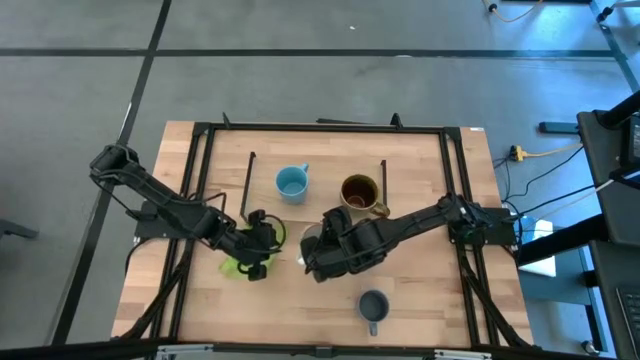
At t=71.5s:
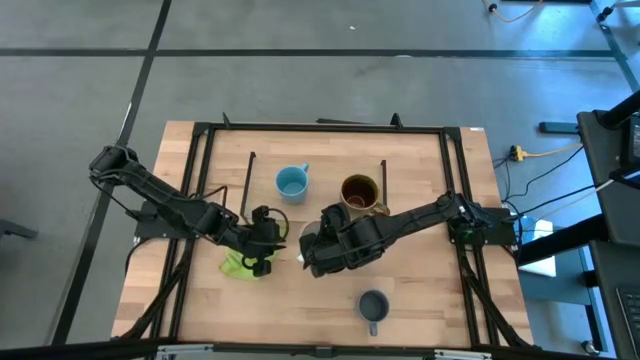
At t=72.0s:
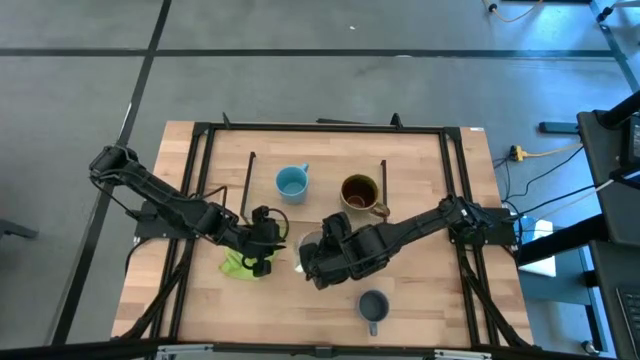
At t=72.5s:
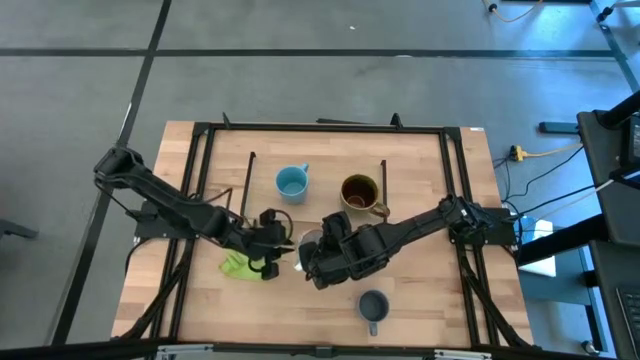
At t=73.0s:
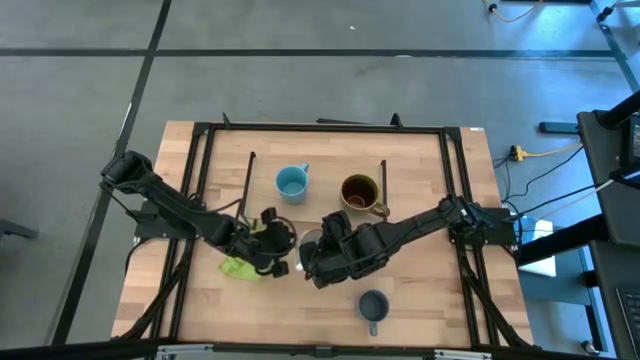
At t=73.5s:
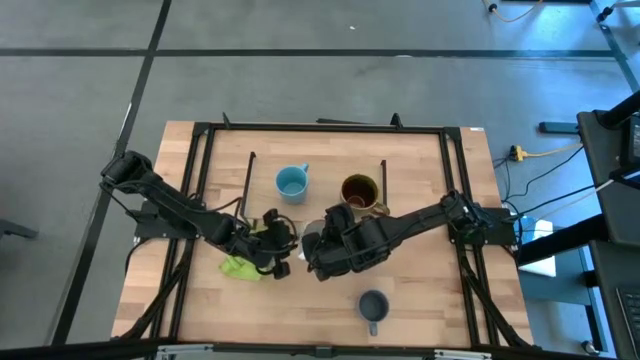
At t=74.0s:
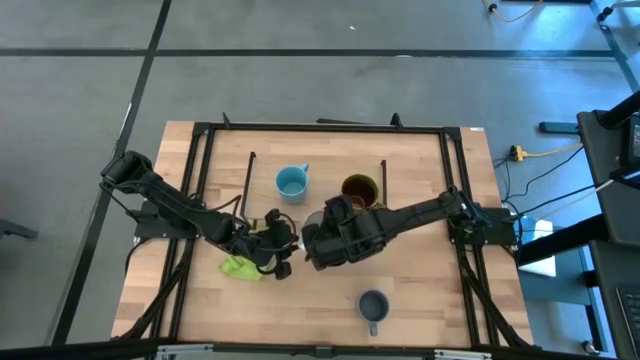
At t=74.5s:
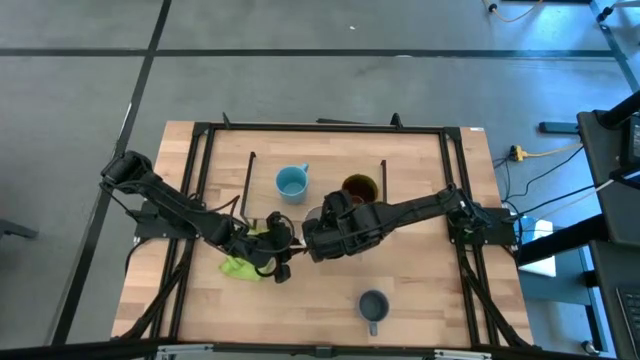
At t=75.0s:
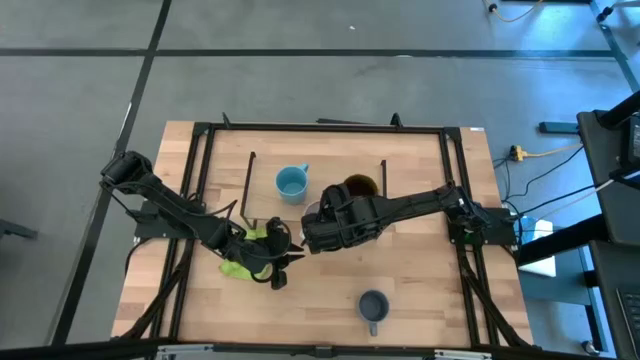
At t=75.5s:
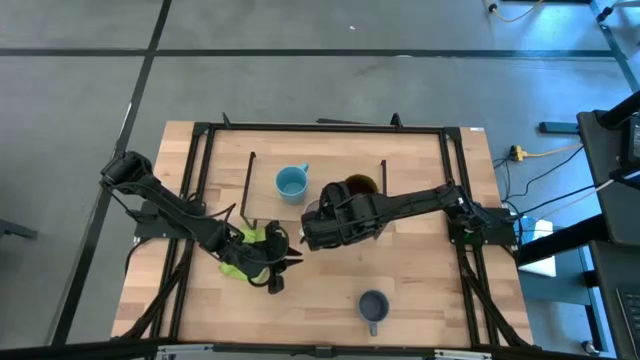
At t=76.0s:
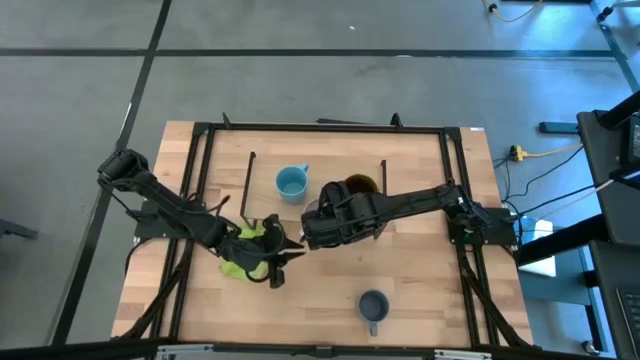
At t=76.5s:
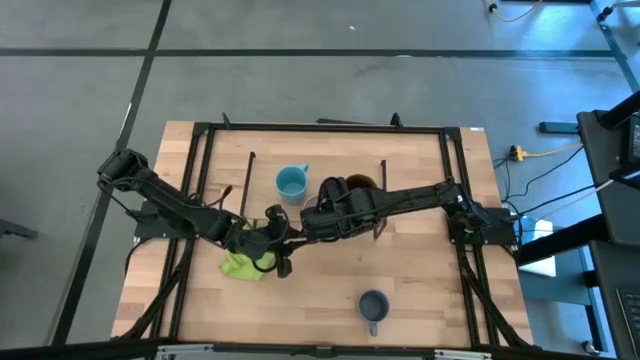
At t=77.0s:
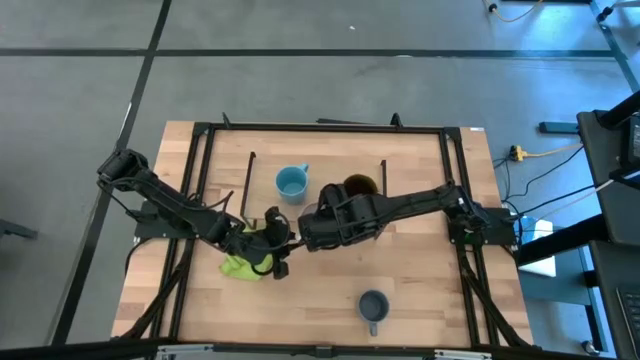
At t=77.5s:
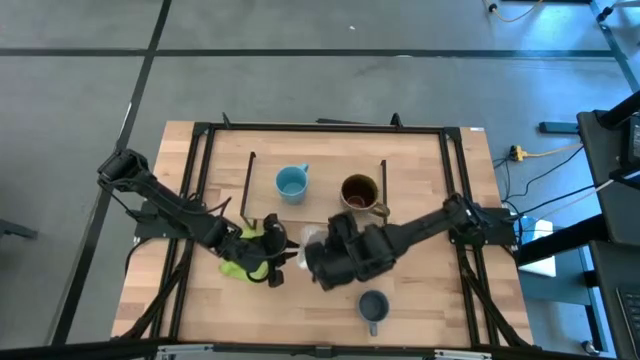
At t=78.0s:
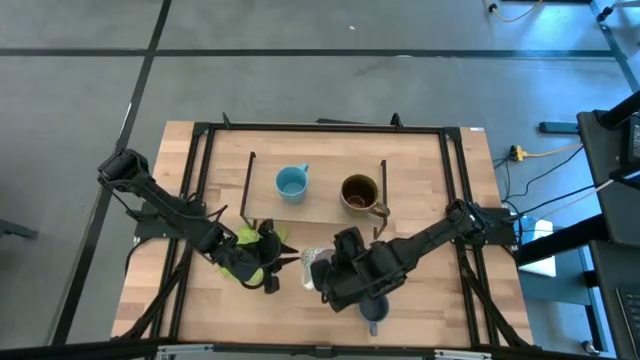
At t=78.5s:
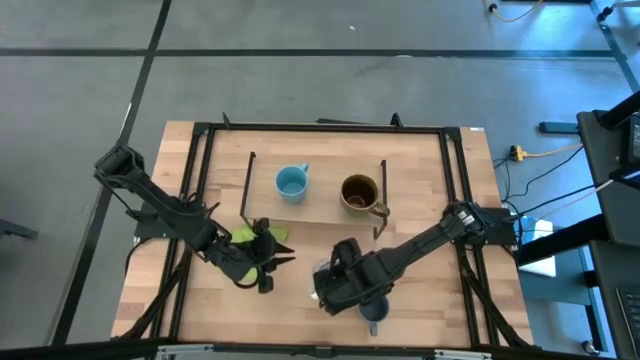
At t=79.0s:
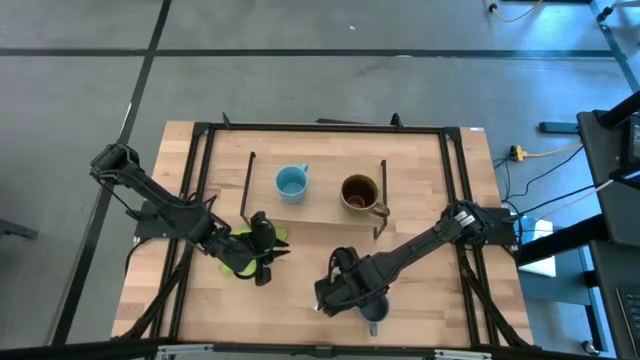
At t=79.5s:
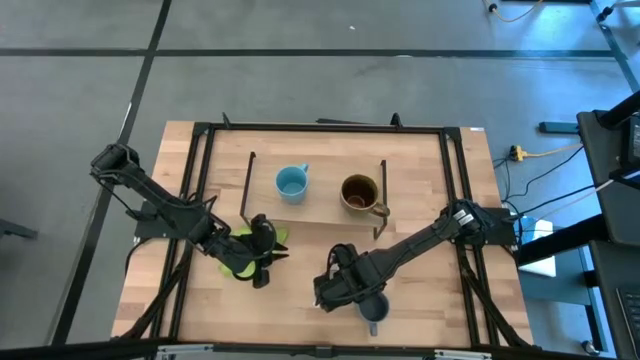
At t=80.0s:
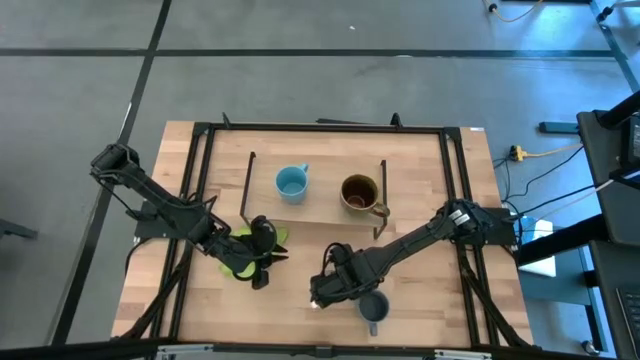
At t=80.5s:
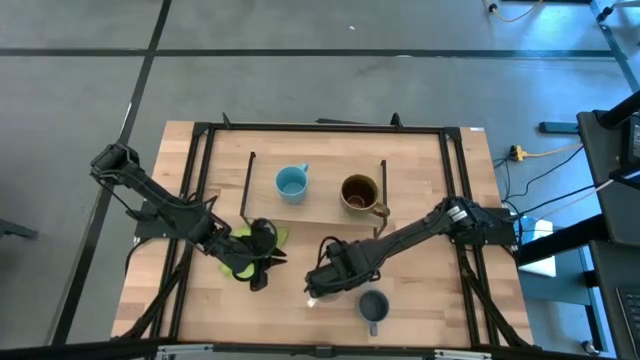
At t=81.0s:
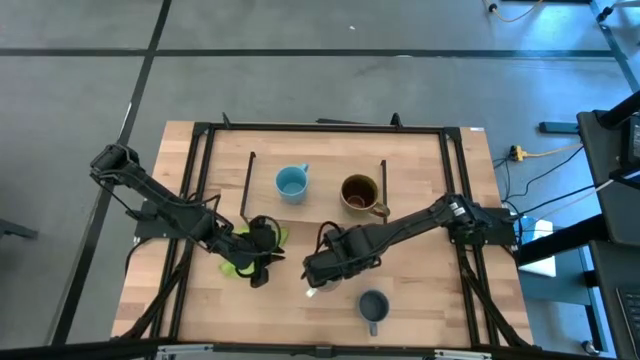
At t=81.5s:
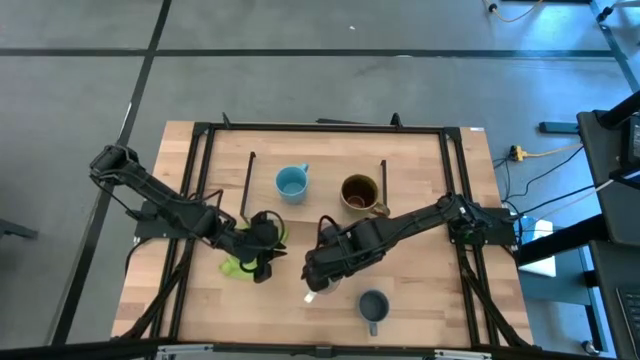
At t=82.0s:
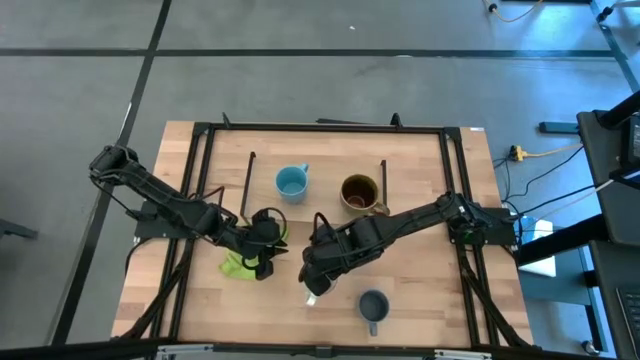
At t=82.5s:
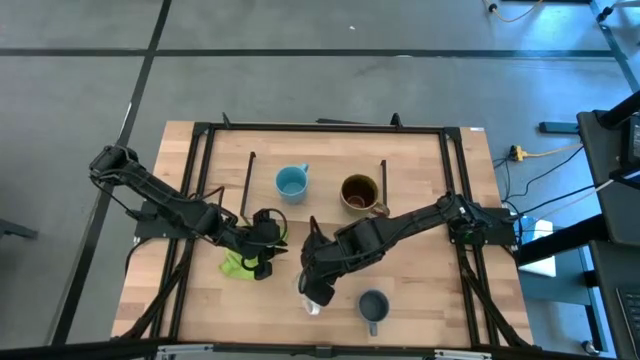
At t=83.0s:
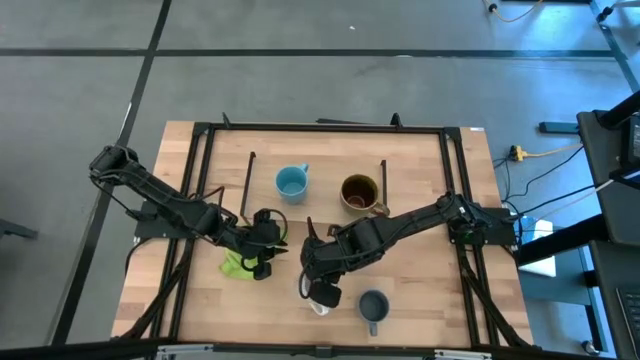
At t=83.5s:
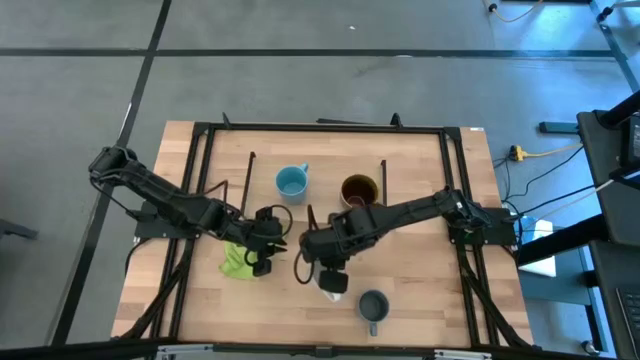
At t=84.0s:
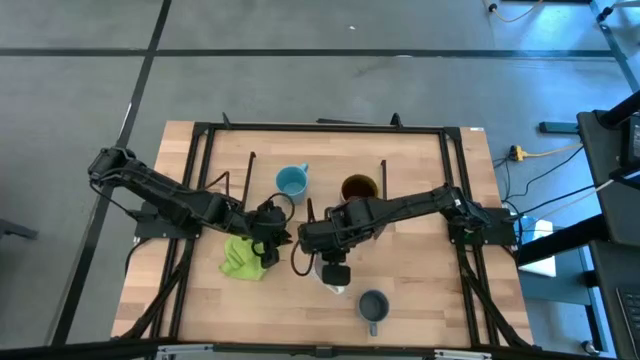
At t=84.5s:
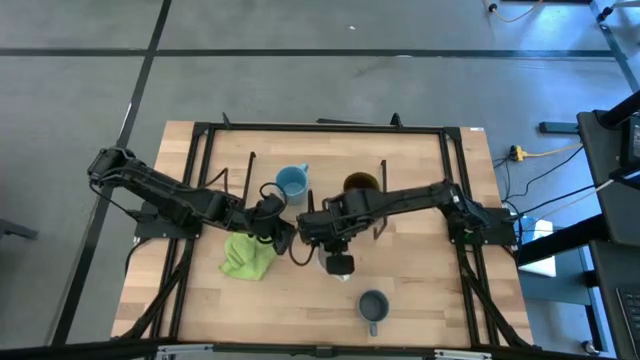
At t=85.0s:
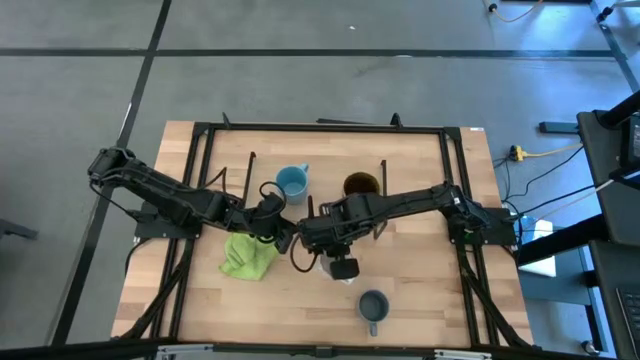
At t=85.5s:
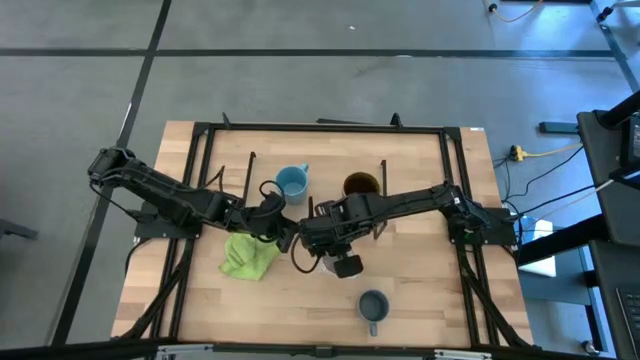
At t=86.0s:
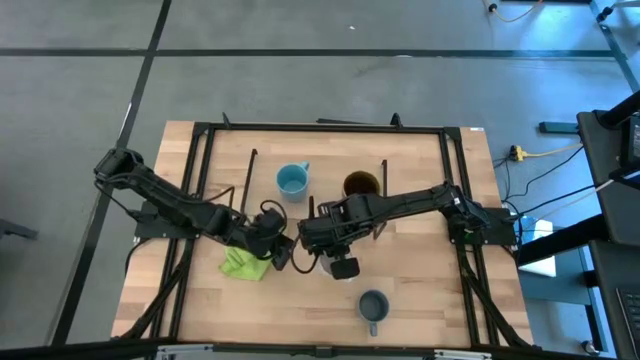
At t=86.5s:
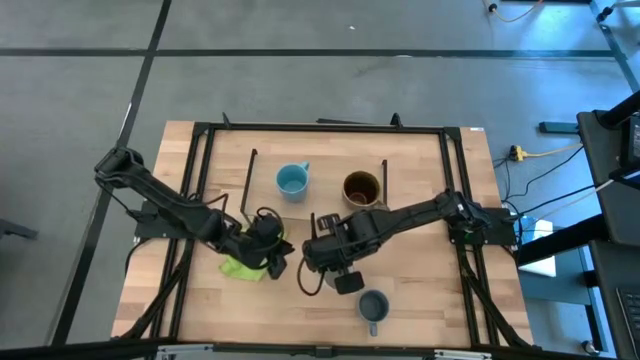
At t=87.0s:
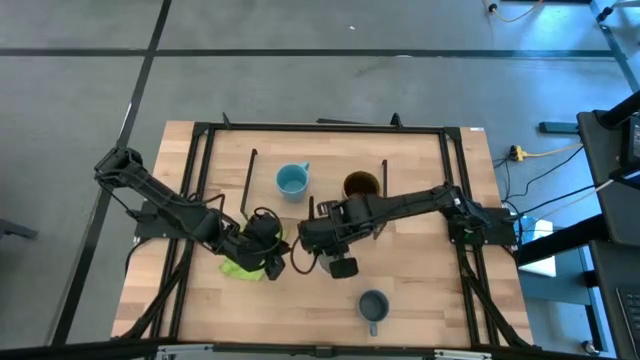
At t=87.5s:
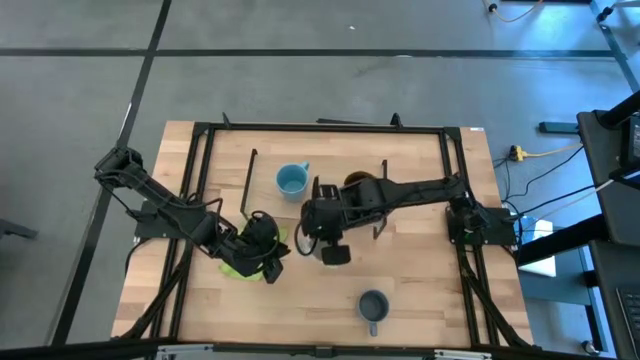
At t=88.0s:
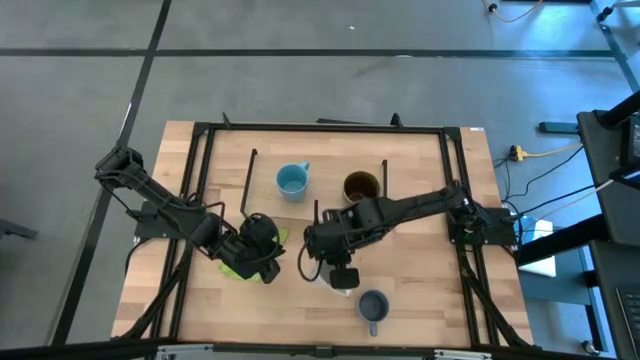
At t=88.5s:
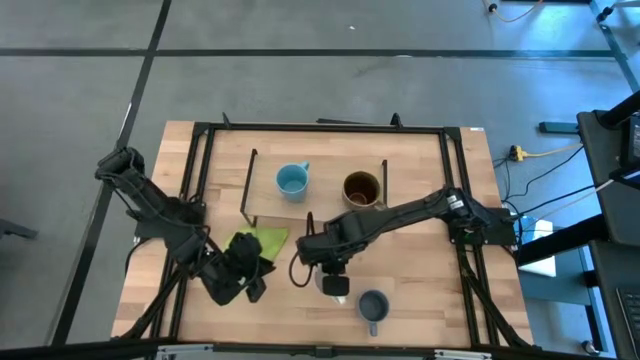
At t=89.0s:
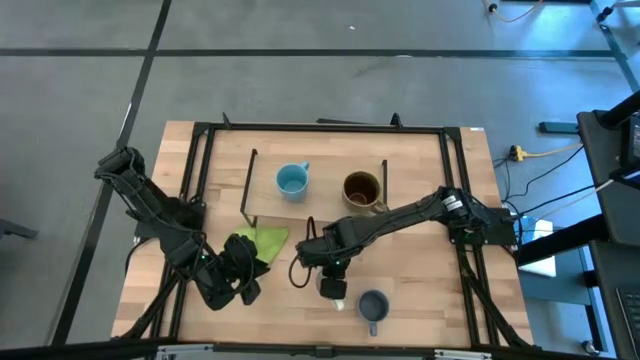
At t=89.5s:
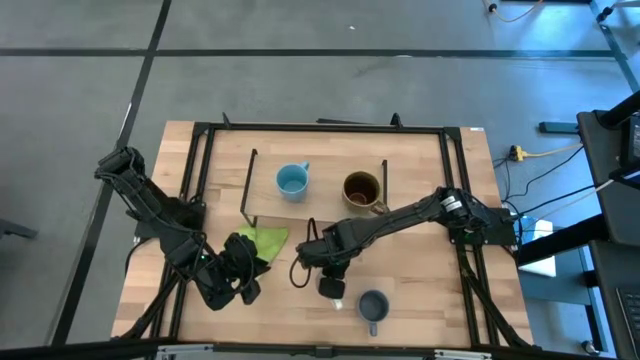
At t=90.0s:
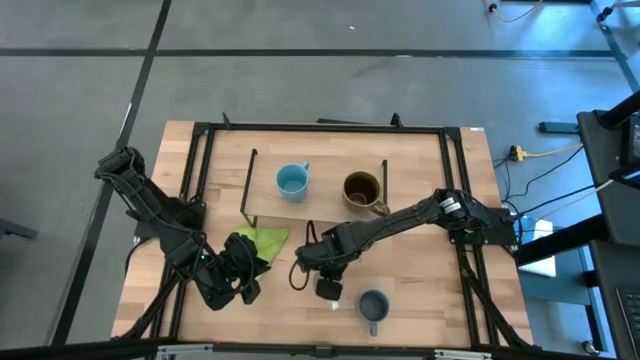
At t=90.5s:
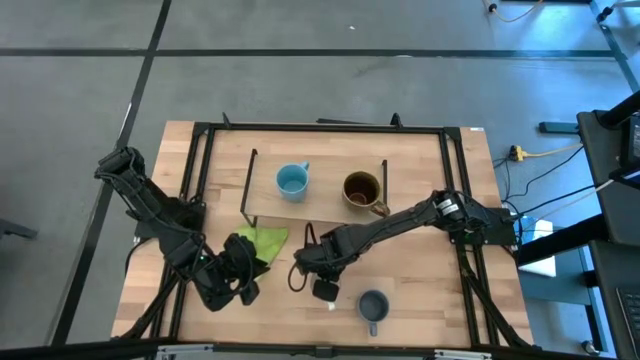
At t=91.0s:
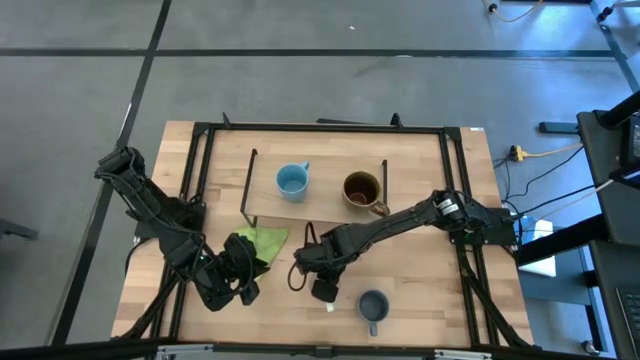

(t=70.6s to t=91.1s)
Task: Stack small to large cups/mugs on shelf
Put the gray patterned mug on the shelf
